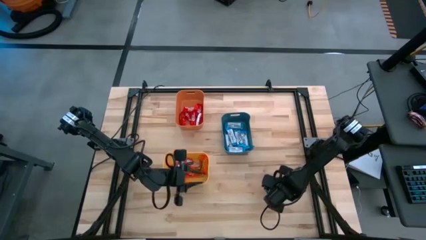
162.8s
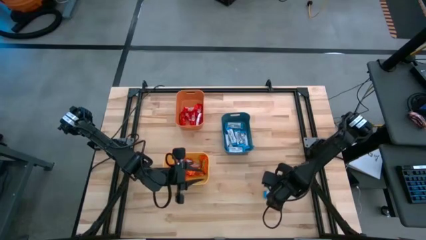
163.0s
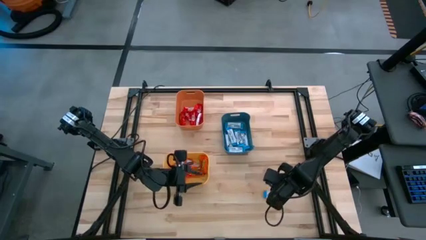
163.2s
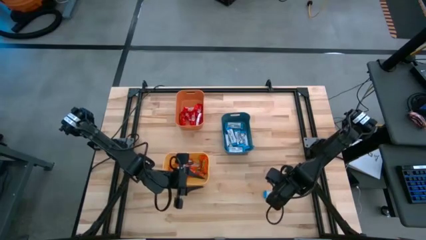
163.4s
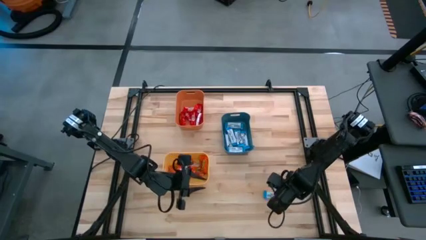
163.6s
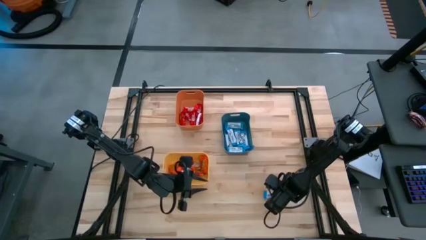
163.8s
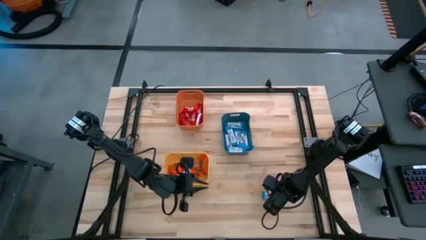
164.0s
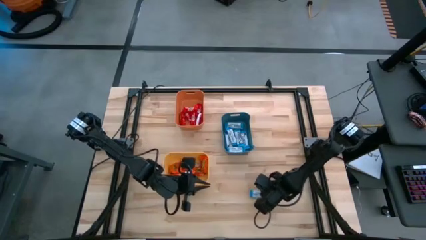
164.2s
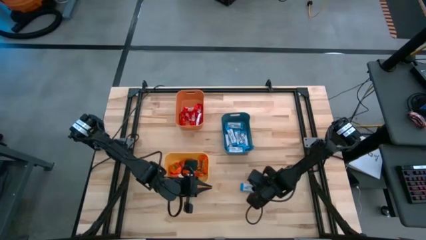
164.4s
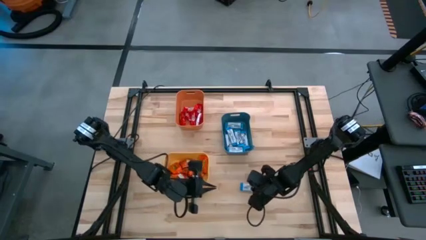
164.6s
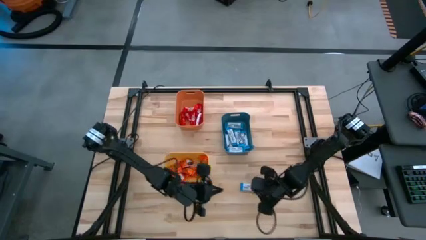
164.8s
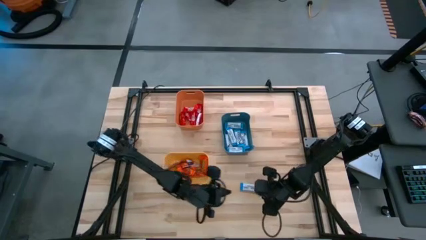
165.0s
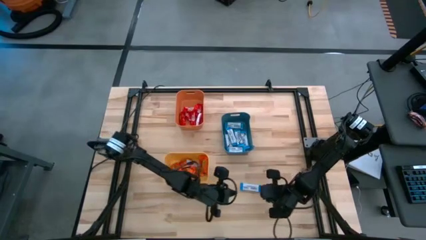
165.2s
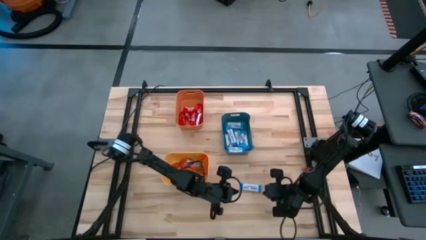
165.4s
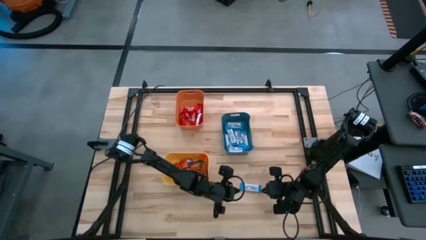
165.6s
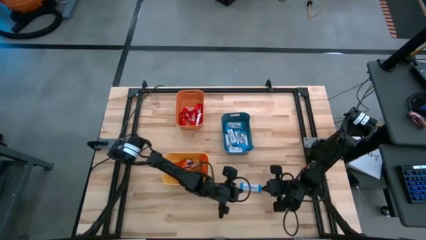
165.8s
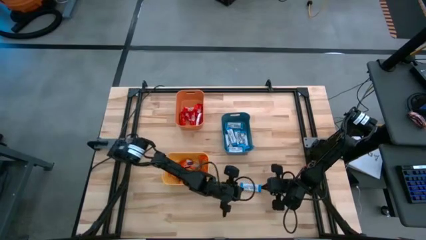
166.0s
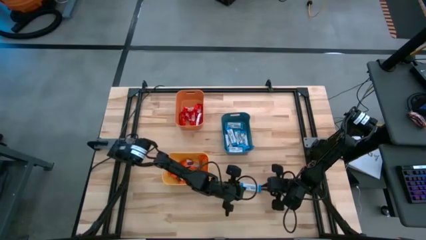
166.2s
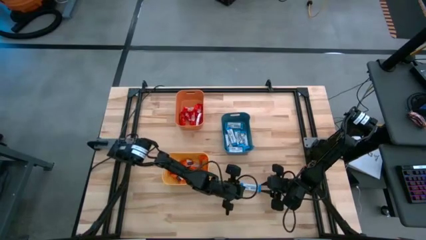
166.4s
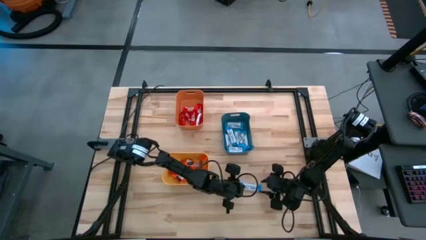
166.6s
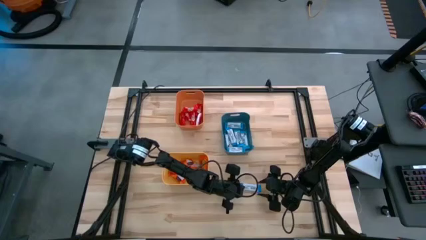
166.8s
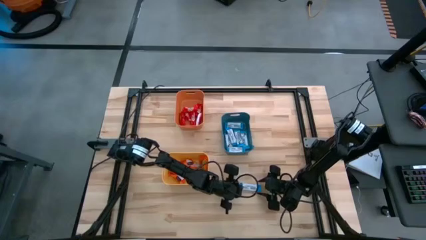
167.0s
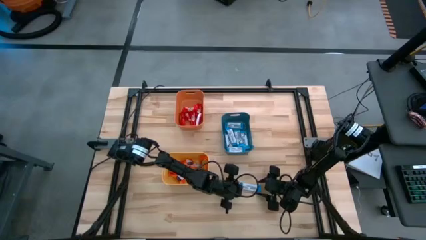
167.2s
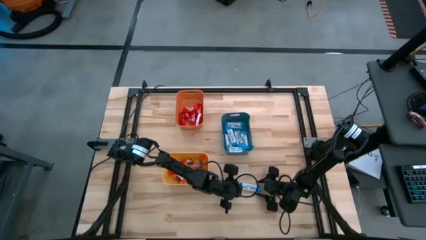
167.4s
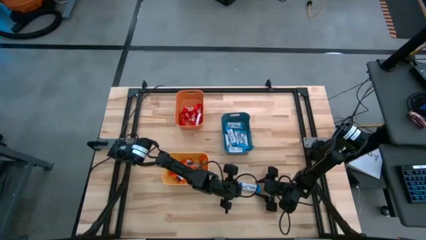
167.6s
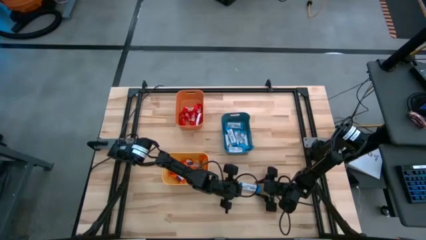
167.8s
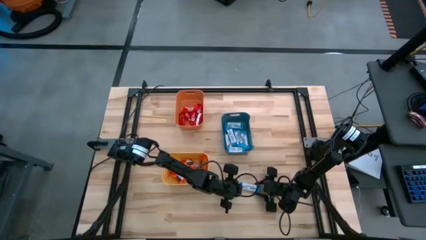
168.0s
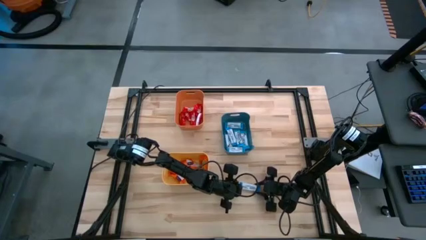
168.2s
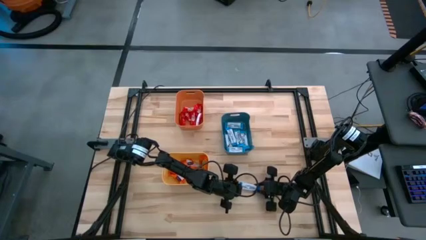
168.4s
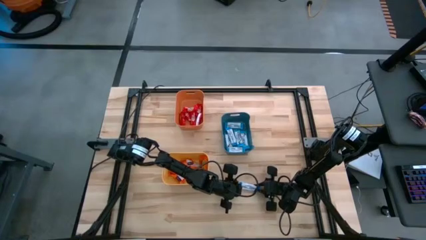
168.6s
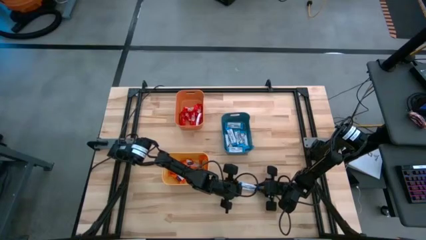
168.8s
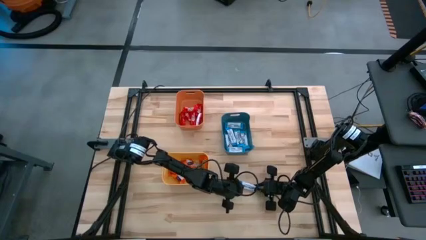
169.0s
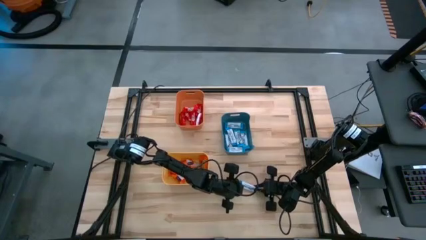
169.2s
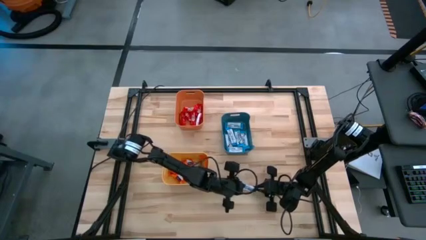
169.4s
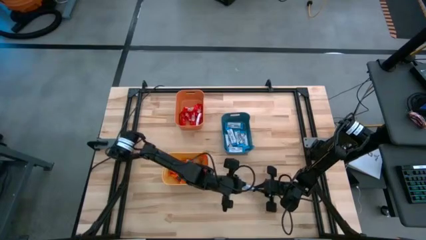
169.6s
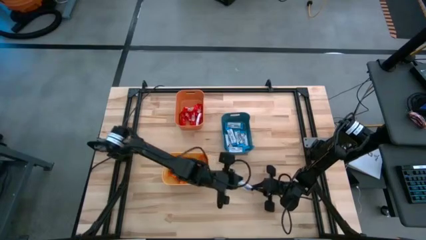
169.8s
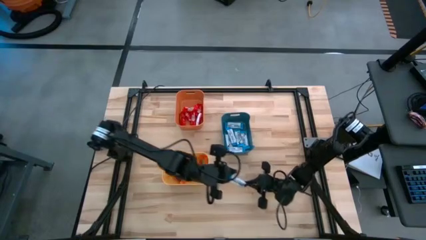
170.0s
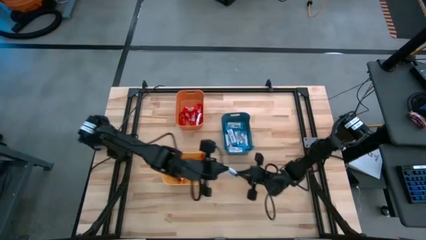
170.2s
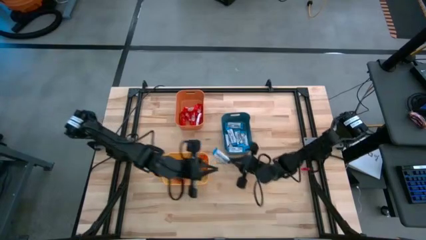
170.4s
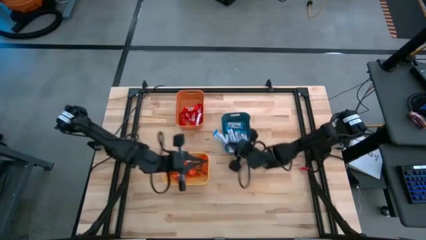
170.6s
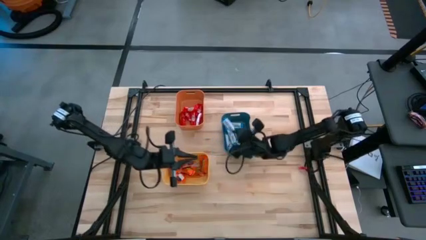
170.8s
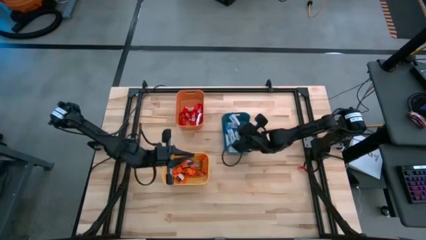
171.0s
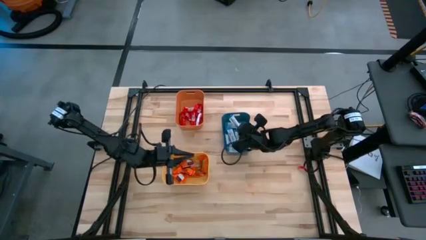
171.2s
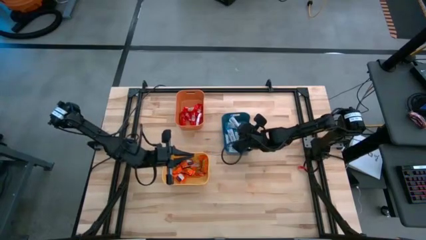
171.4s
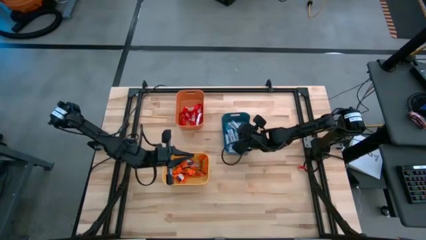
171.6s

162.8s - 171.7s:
Task: Organize candy in baskets
Put the white chocolate into the blue bin

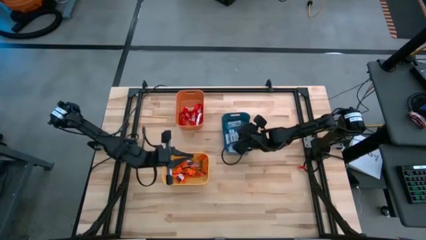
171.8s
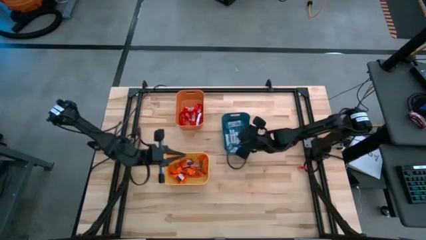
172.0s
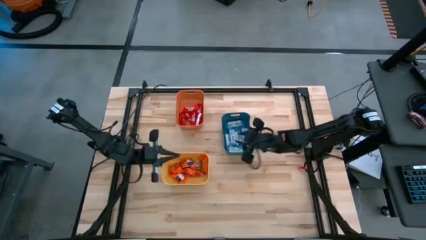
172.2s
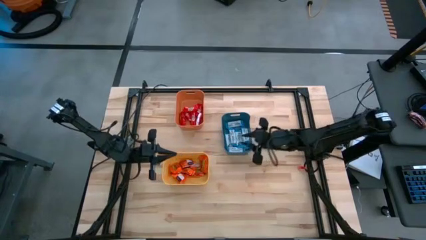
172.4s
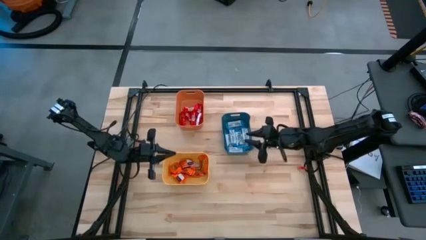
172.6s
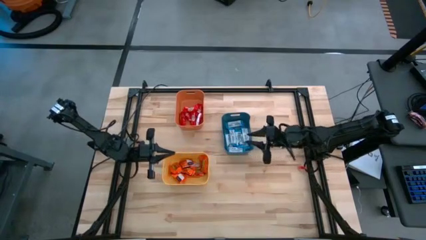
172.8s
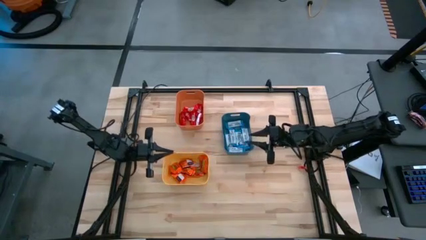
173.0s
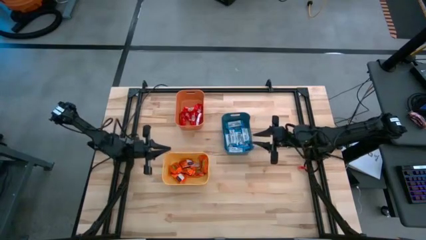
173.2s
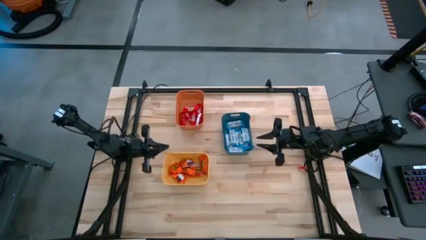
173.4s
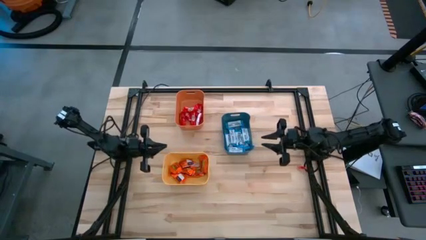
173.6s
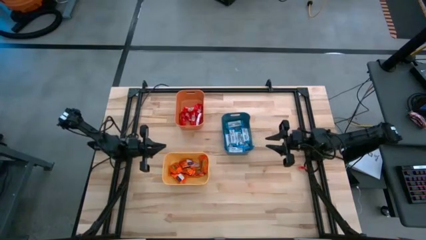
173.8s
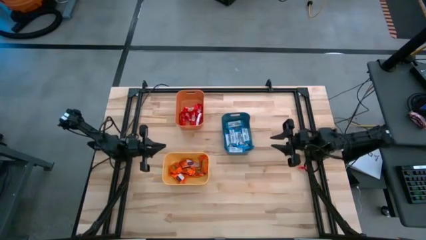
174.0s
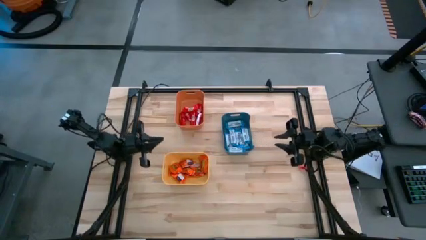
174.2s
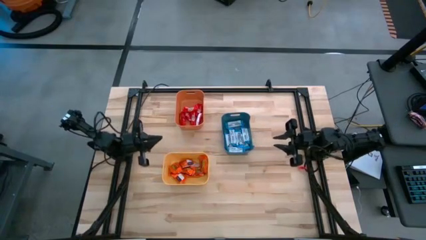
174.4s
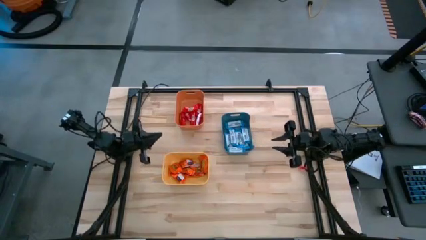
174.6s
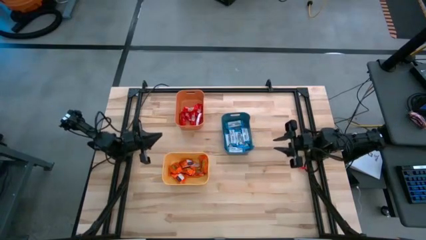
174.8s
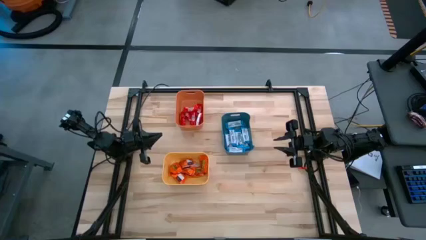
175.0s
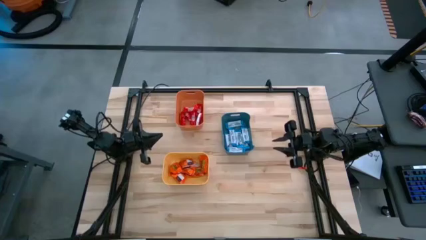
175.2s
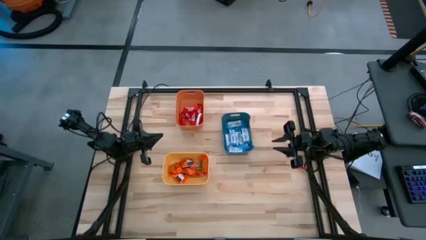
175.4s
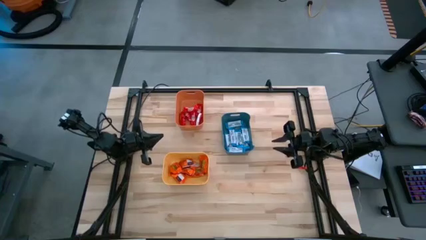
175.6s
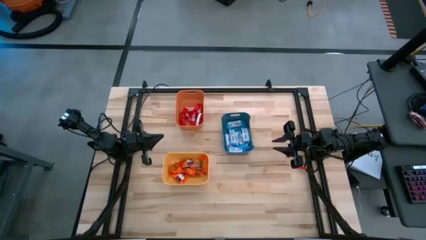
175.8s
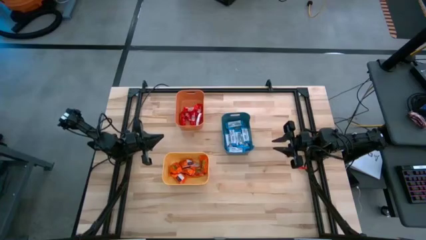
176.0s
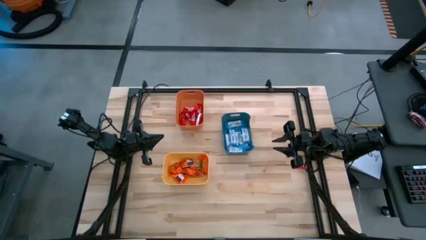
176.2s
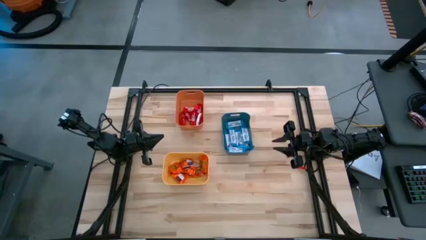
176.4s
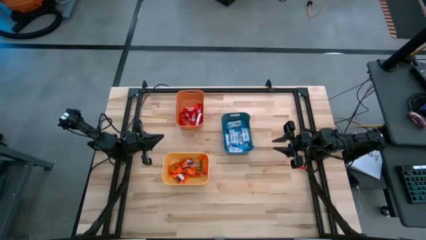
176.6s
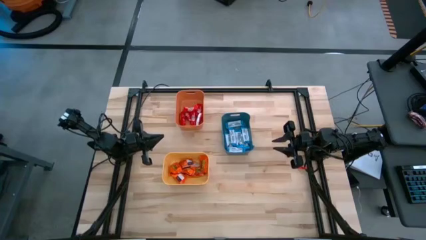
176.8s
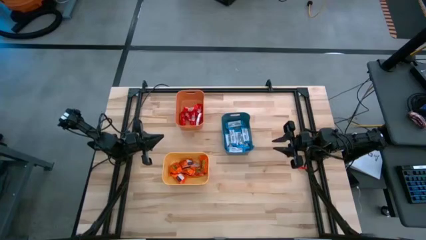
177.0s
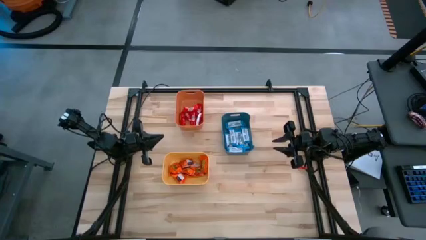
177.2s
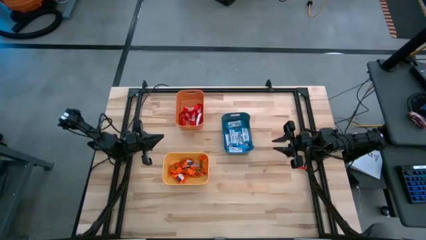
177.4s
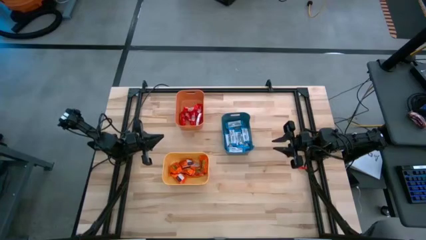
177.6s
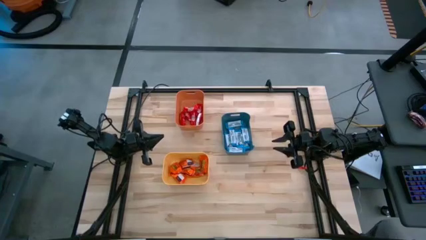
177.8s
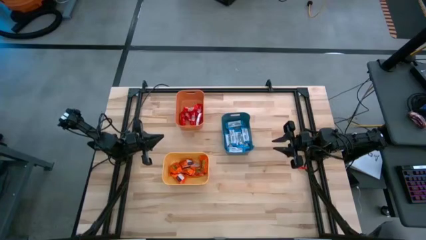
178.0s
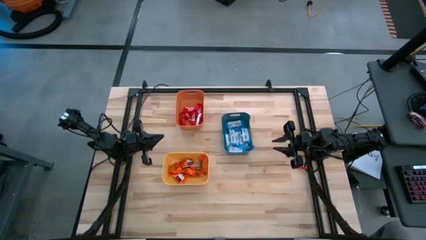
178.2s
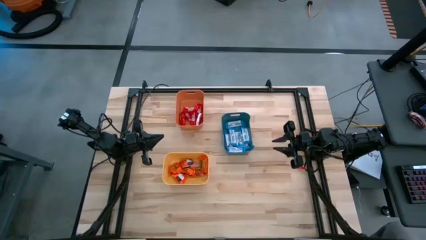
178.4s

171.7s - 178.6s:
Return to Home Position
